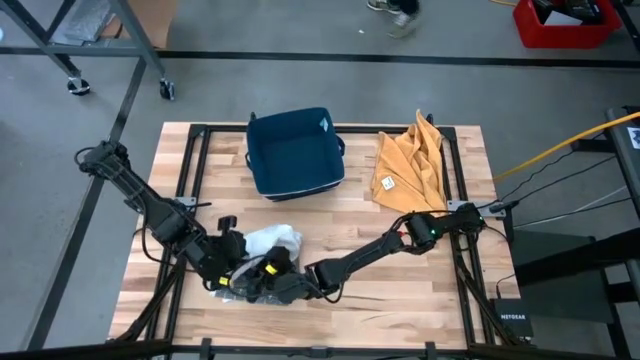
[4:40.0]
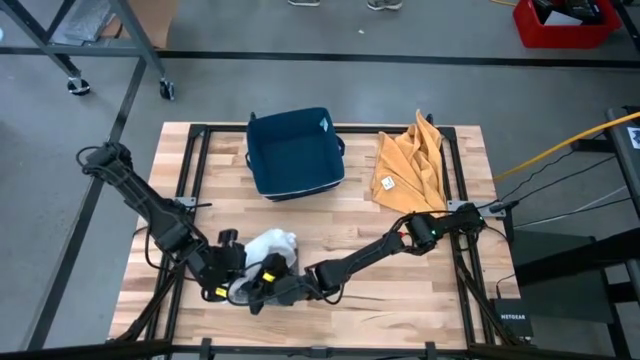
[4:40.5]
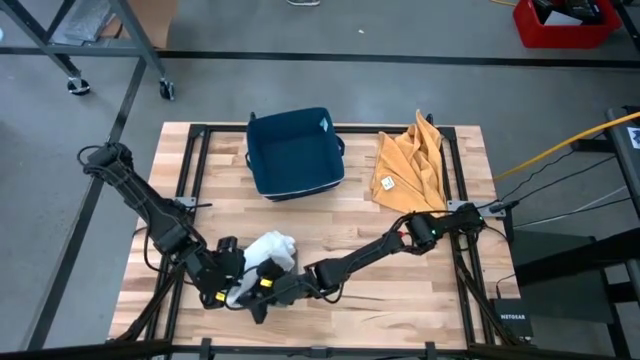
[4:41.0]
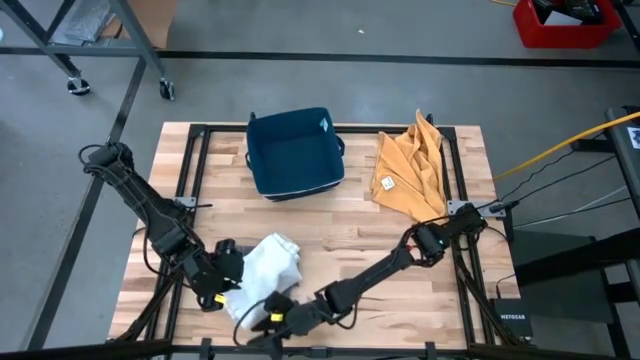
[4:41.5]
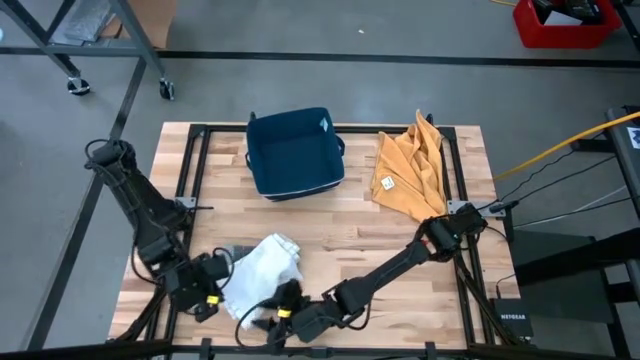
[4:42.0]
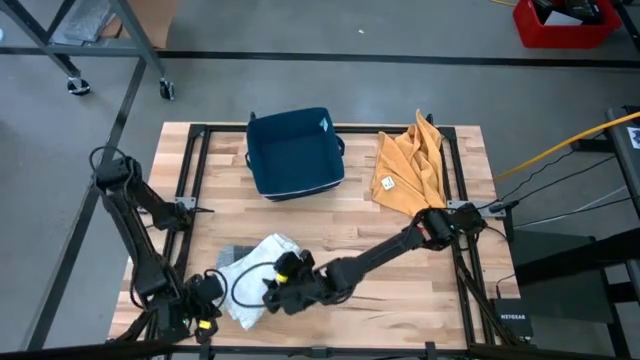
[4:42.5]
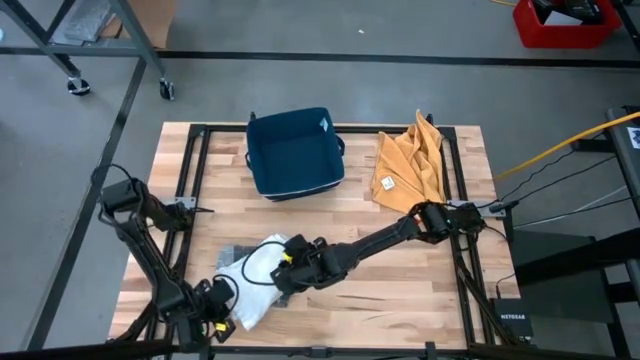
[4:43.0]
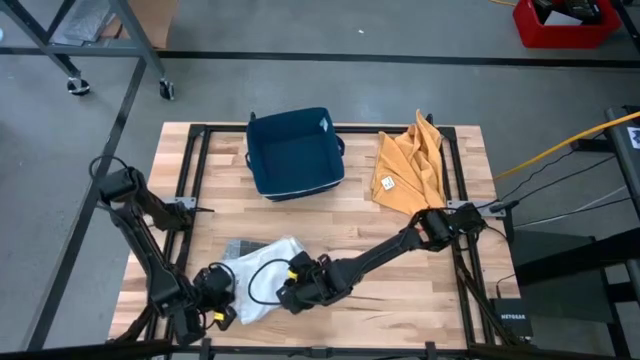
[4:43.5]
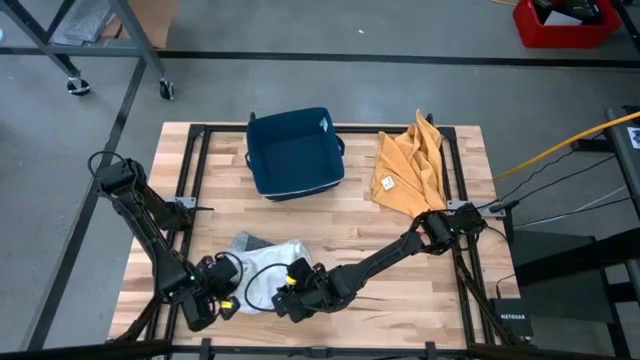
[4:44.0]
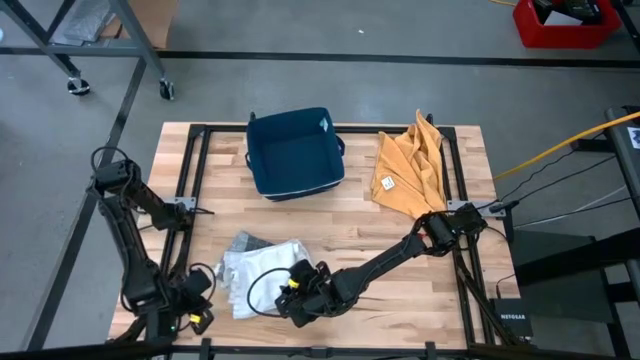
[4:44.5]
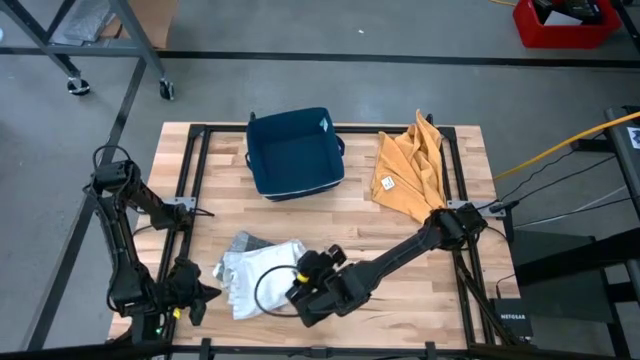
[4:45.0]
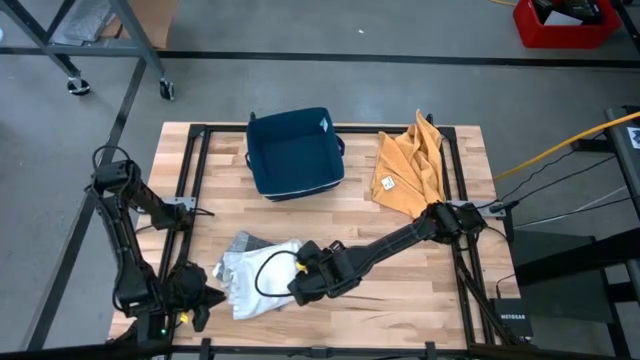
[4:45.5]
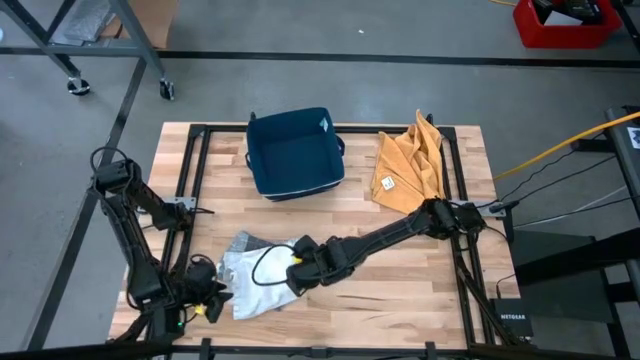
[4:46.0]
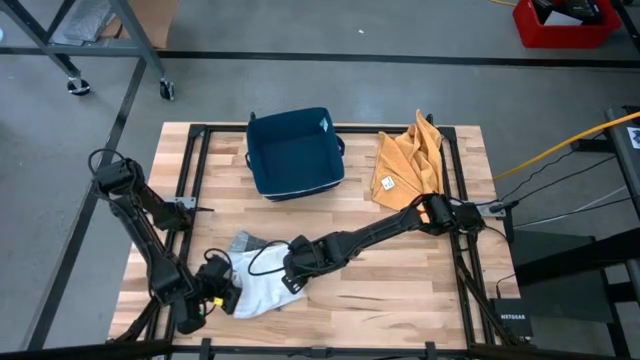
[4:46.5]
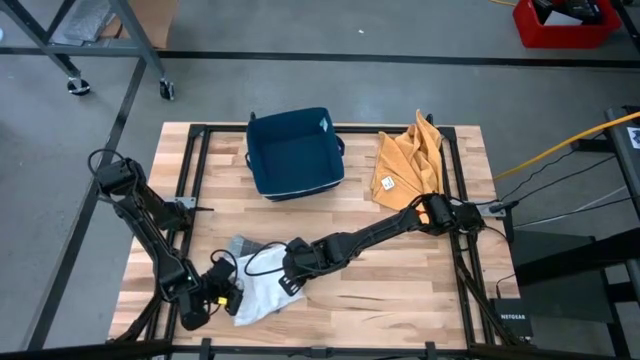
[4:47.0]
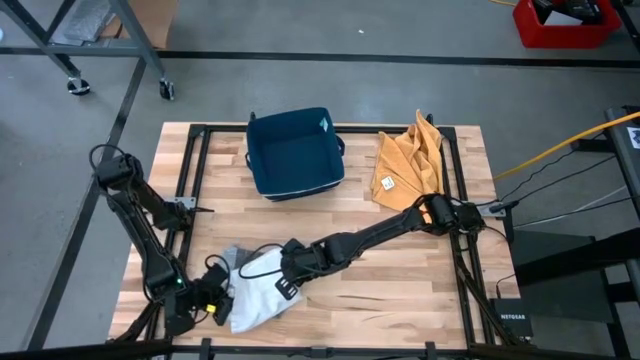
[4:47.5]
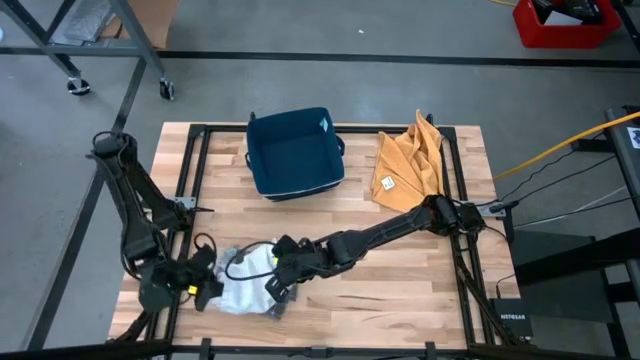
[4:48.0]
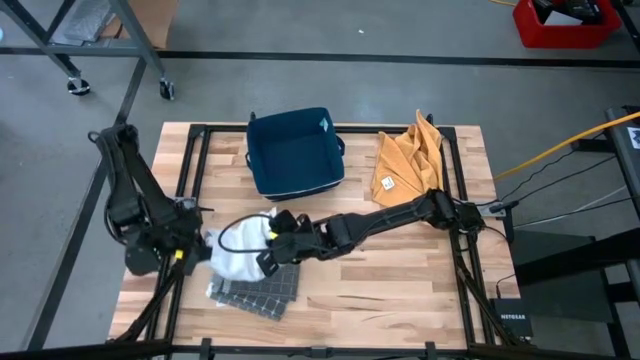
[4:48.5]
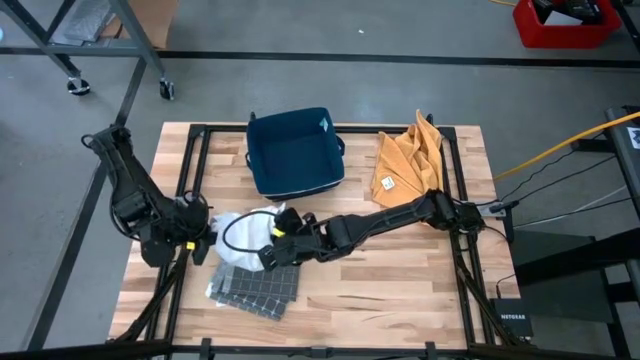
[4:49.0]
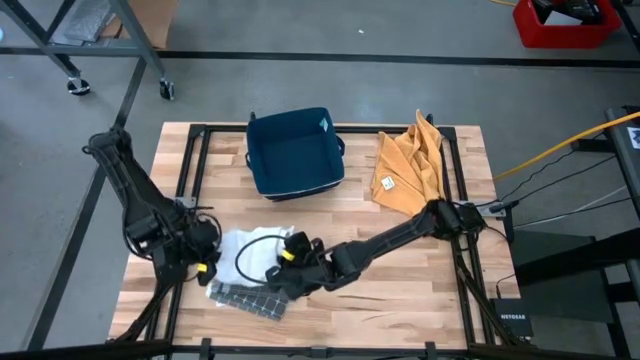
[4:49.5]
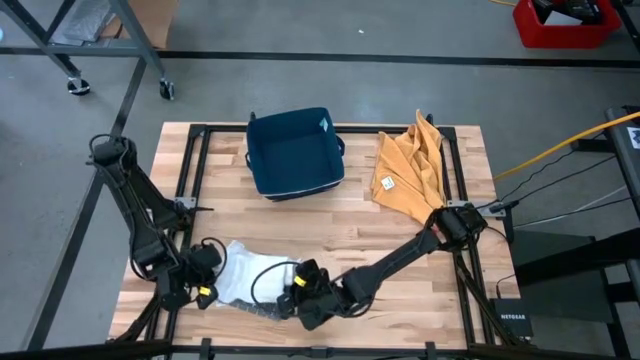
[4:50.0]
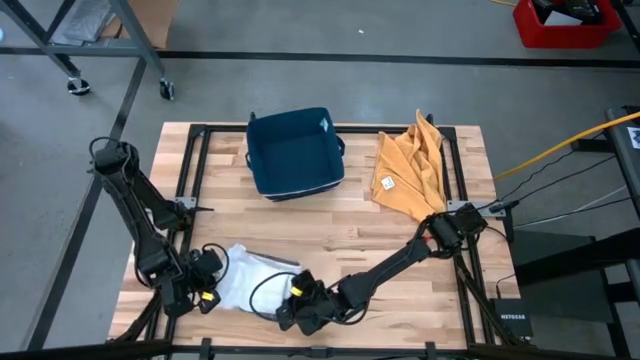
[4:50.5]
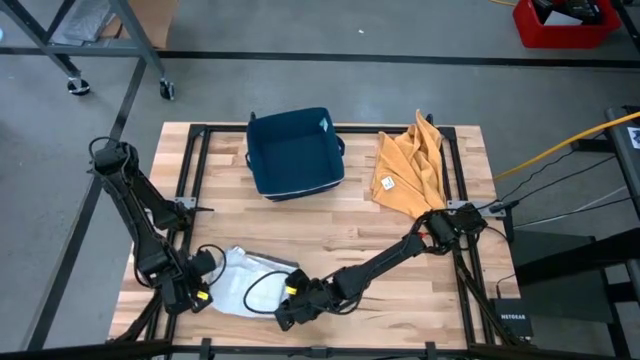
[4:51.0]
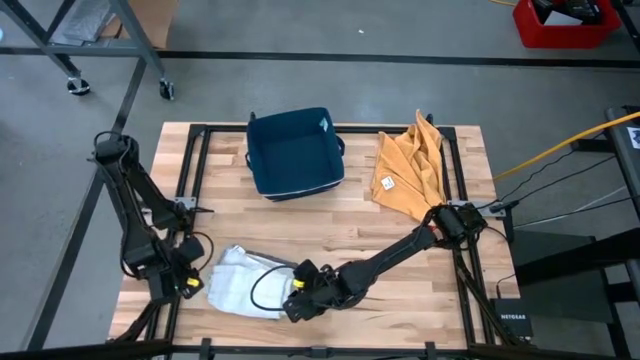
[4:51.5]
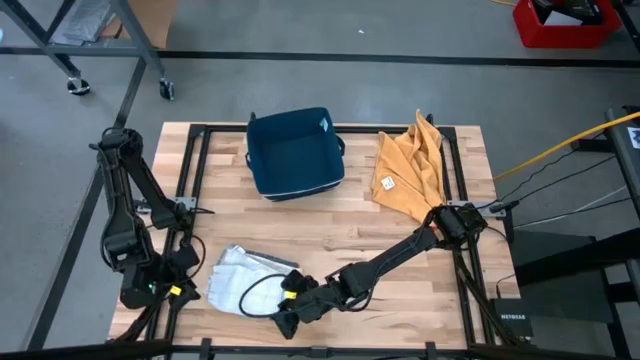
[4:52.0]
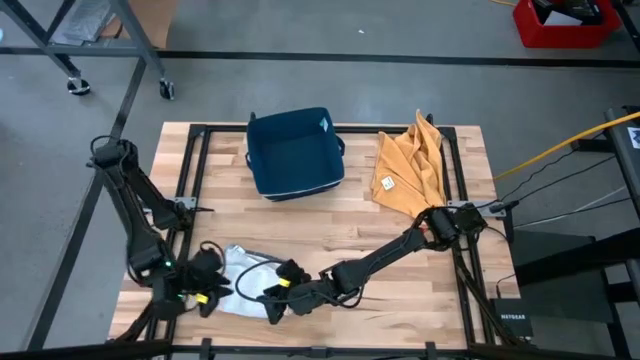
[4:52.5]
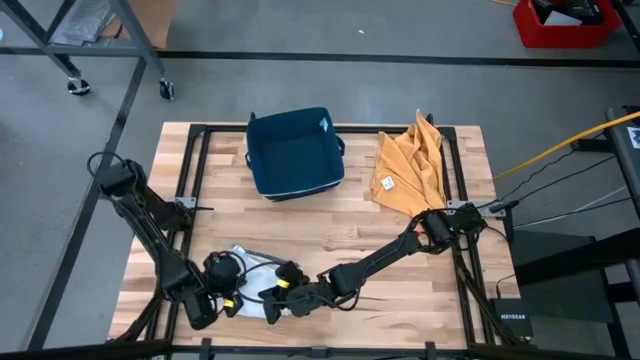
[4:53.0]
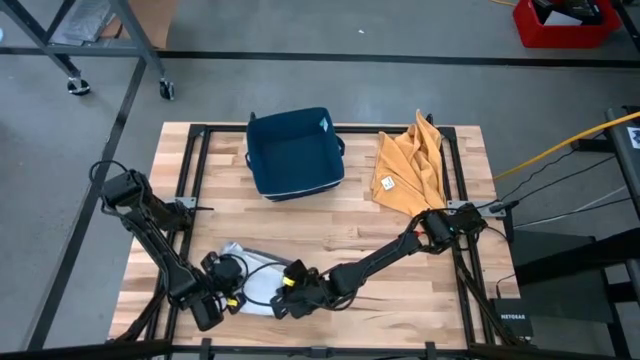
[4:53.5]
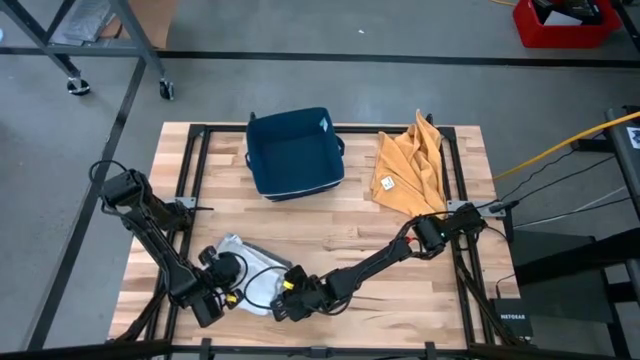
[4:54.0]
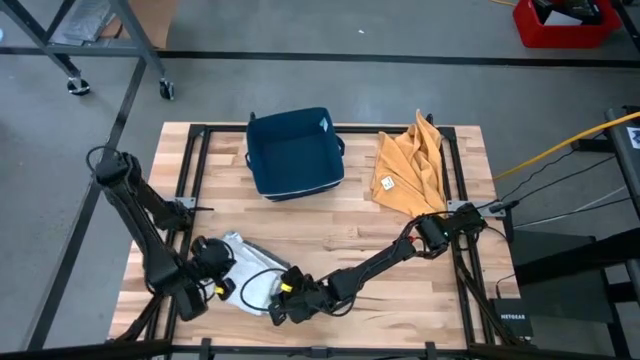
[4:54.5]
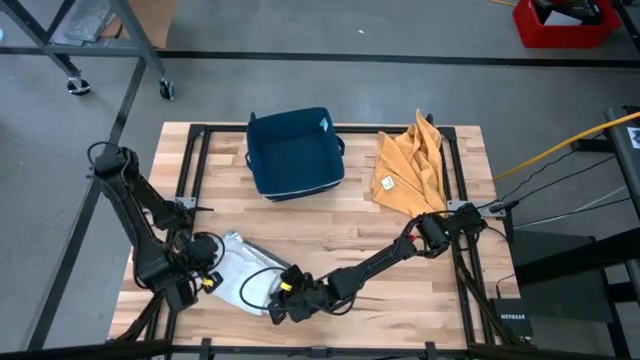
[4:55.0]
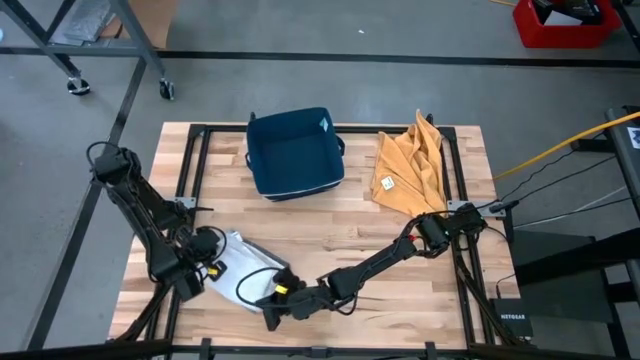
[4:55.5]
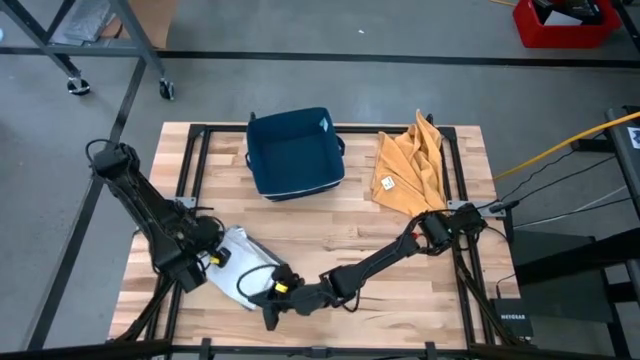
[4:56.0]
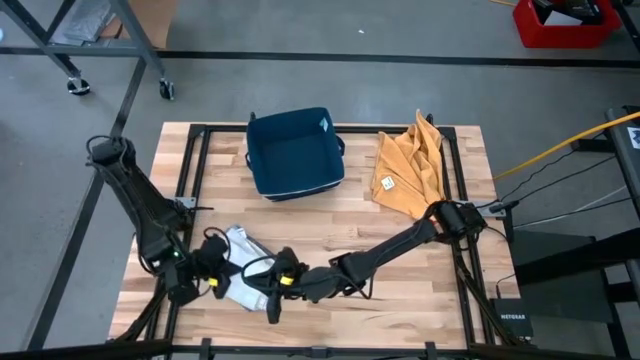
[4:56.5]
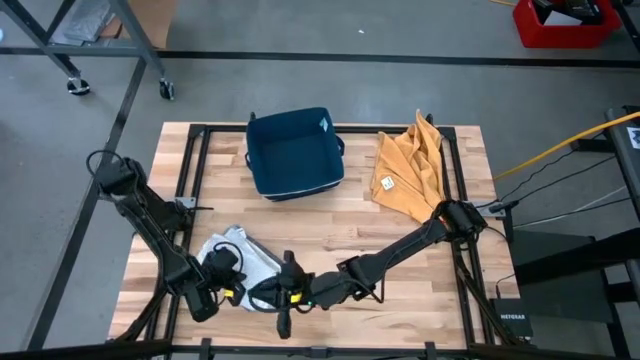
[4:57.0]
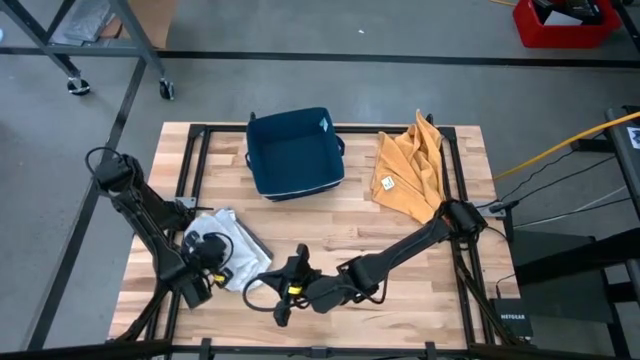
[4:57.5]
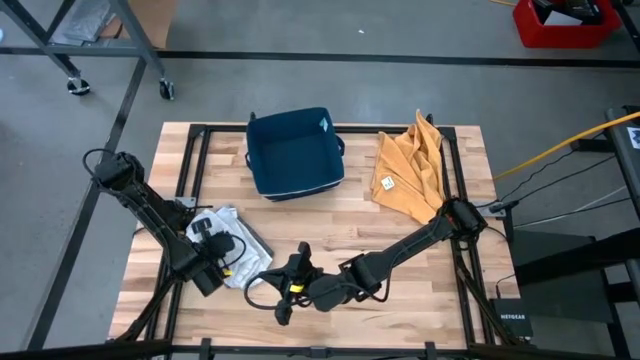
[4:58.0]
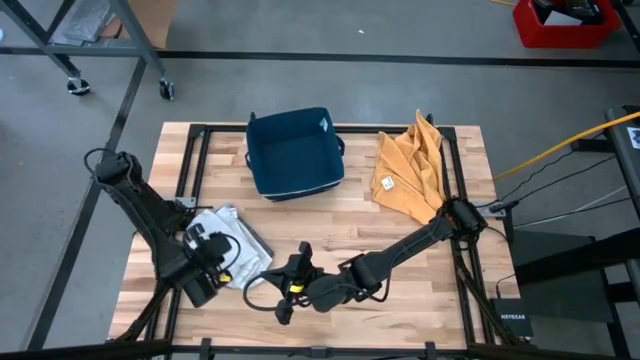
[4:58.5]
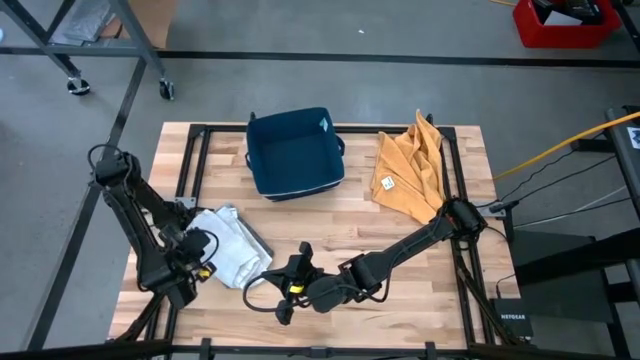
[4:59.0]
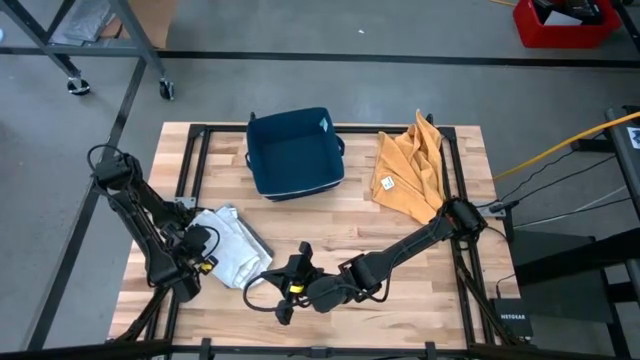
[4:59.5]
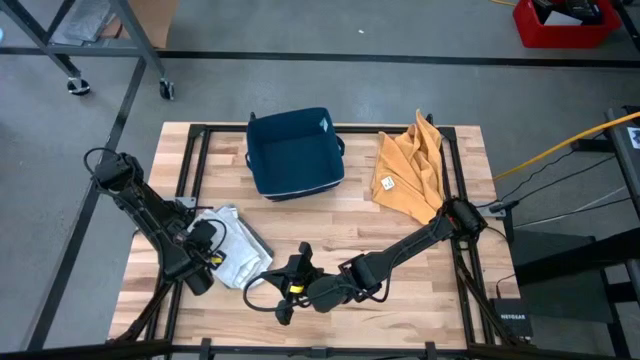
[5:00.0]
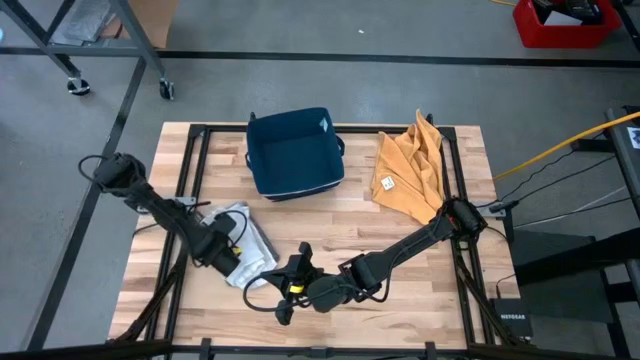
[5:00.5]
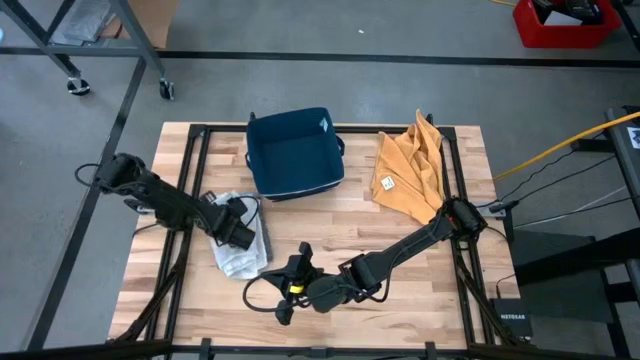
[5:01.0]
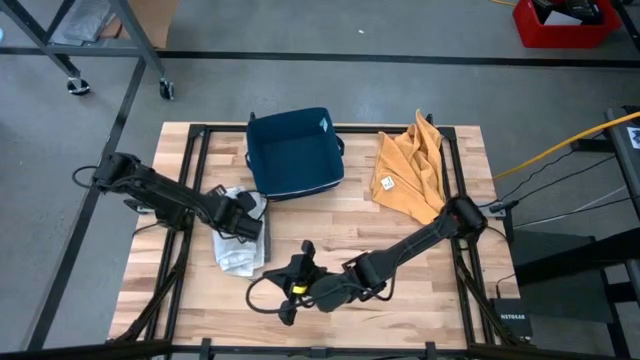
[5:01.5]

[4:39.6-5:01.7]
Task: Fold towel
Stack the folded white patterned towel on top of the folded gray patterned towel
